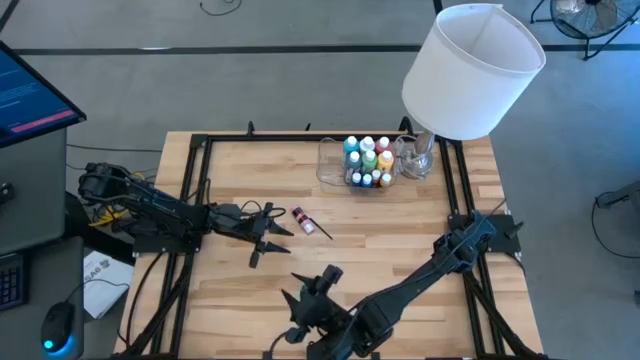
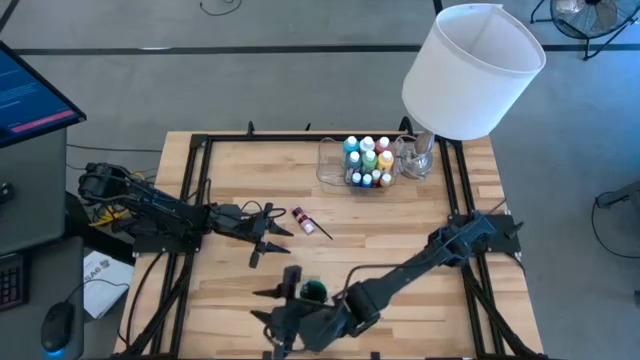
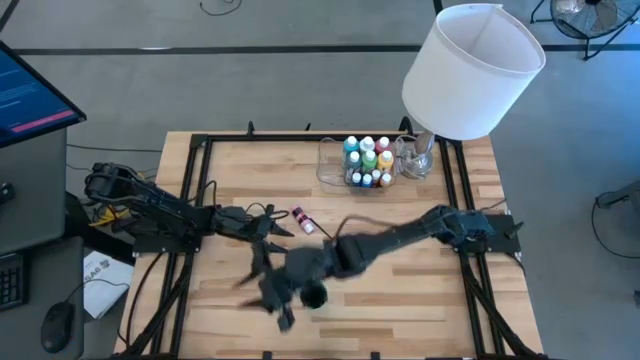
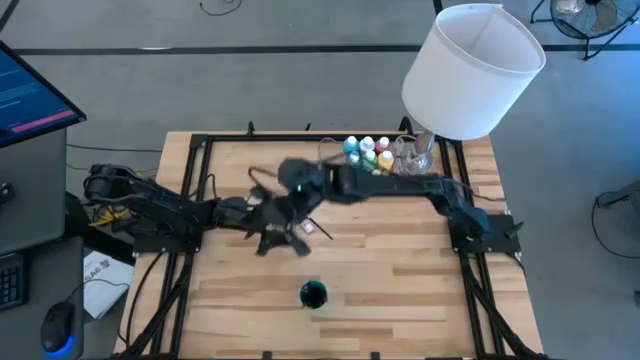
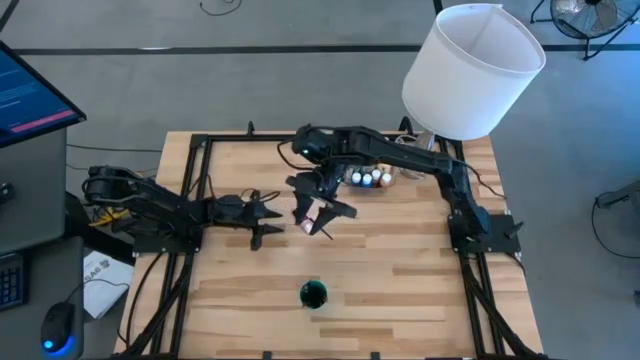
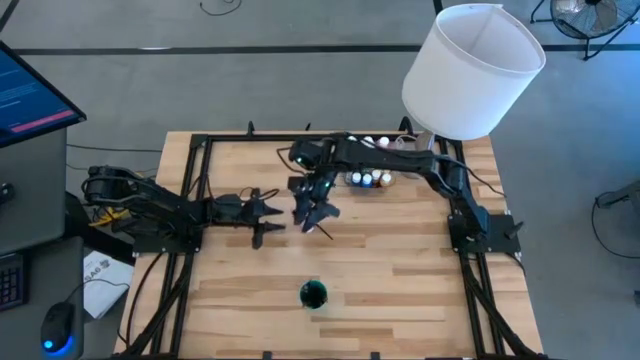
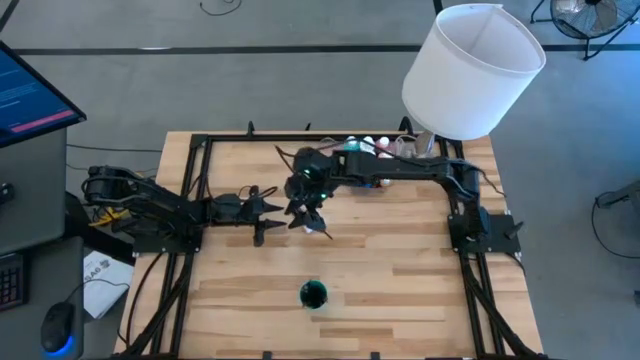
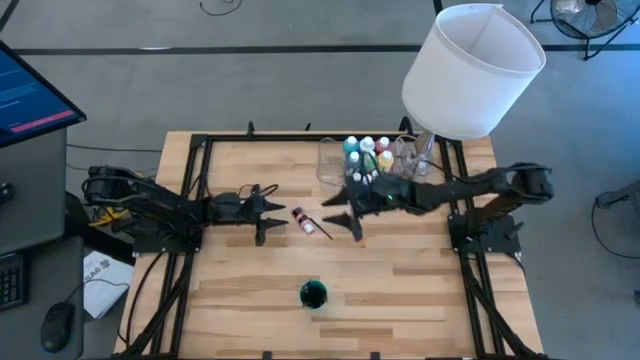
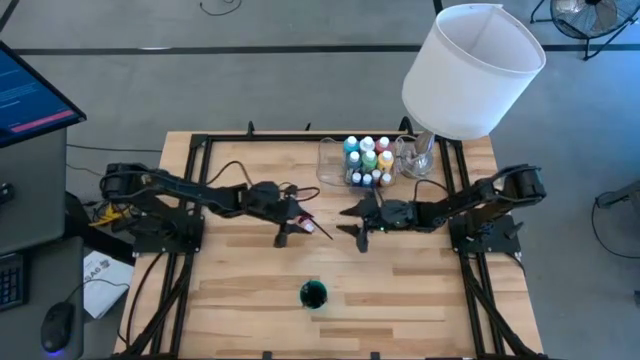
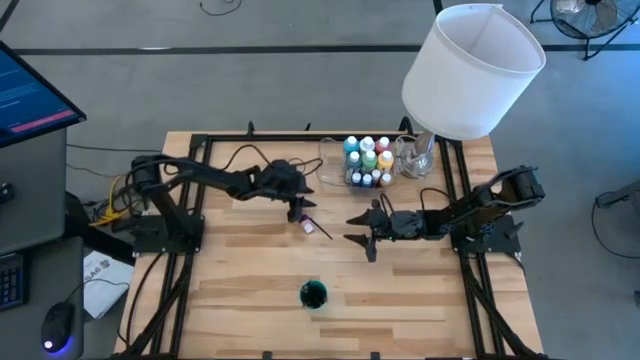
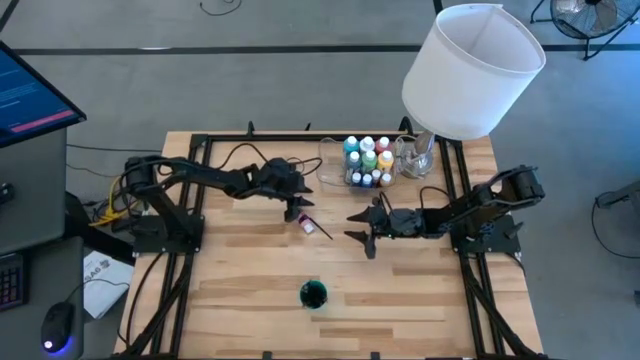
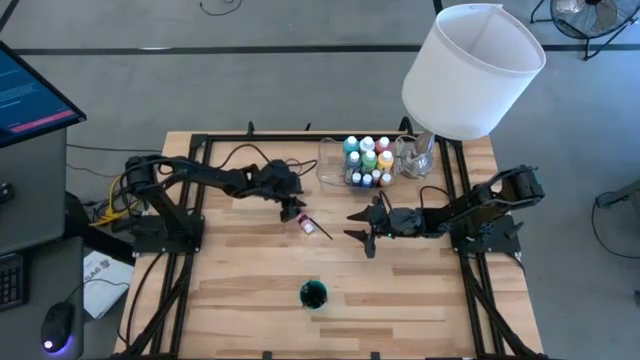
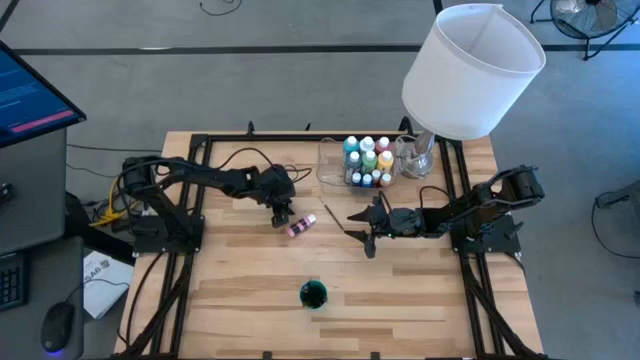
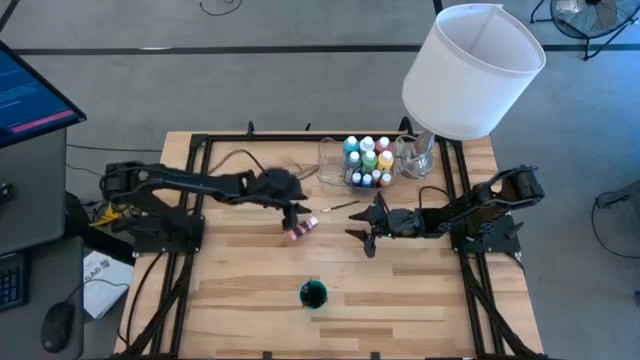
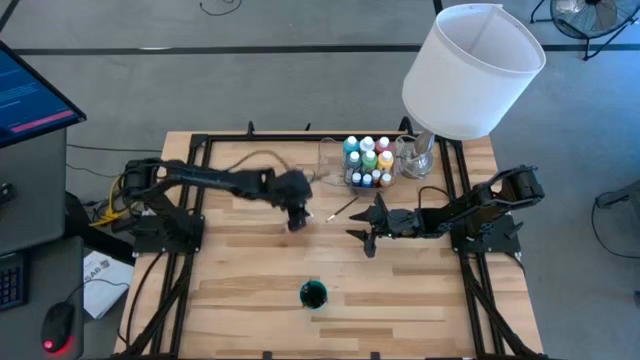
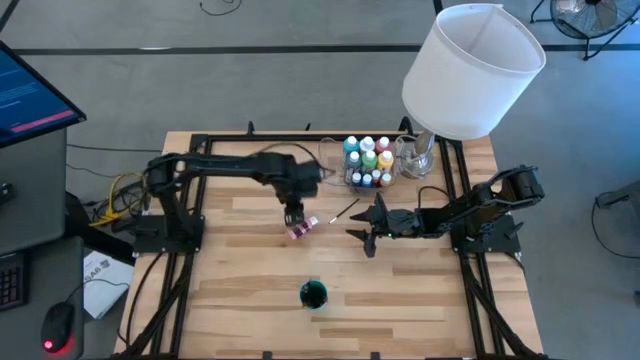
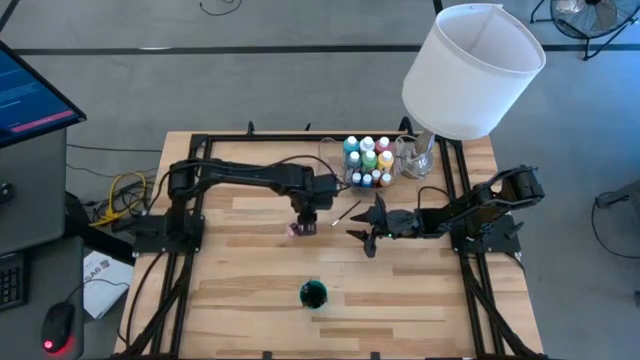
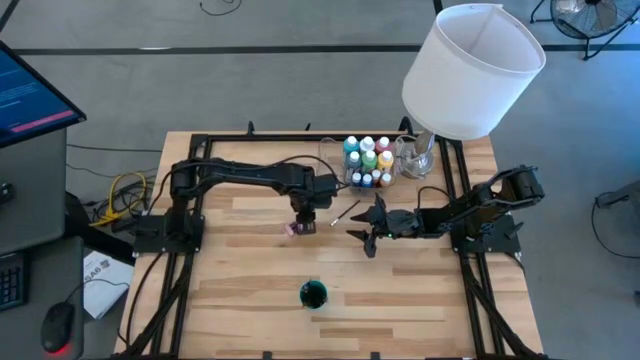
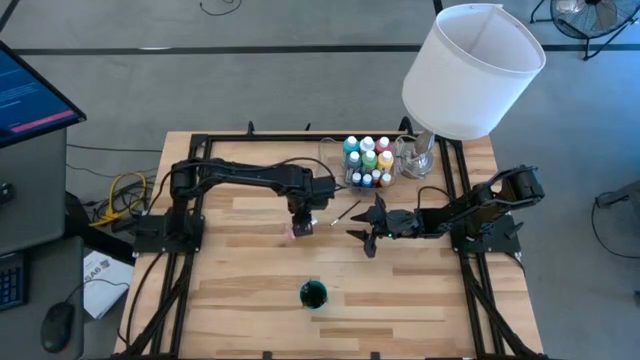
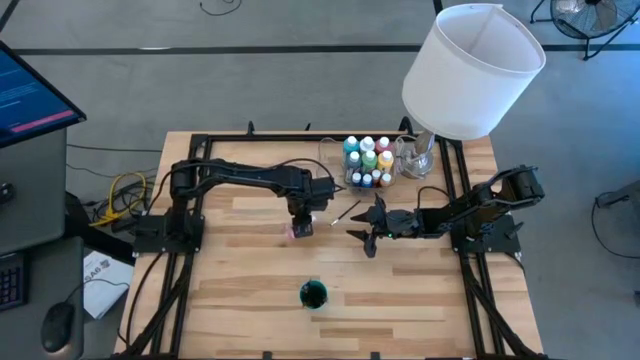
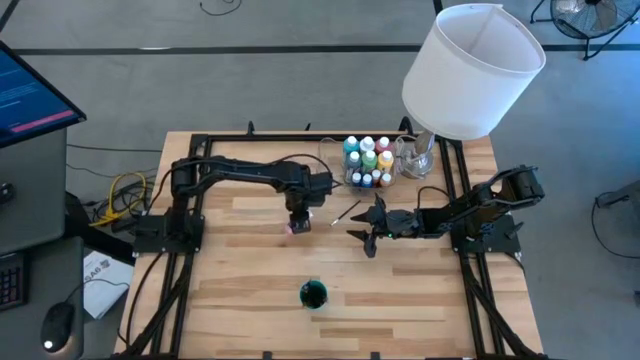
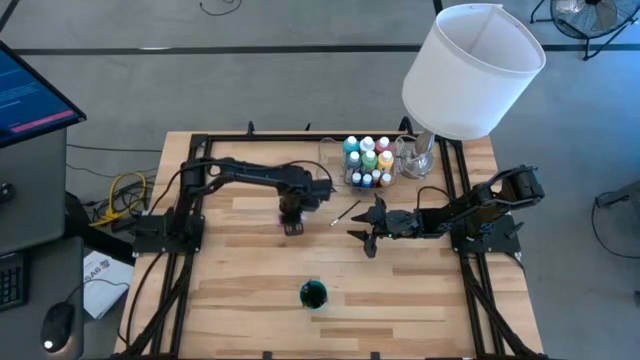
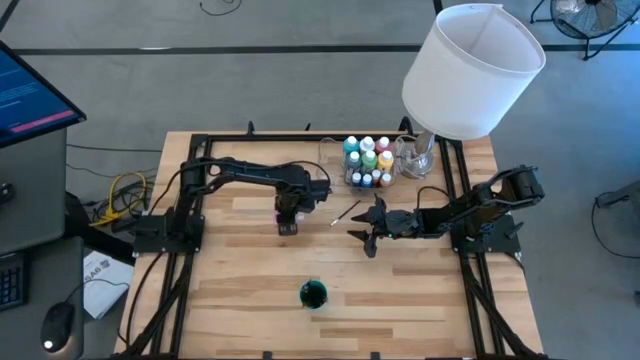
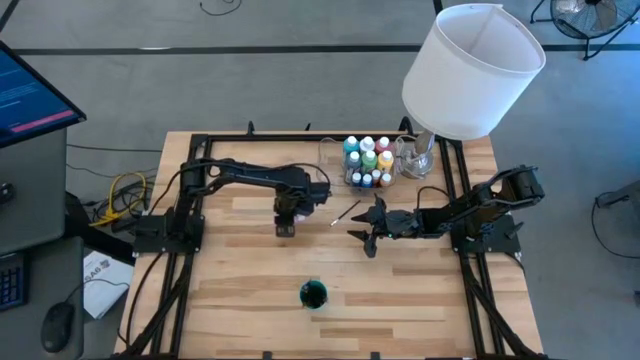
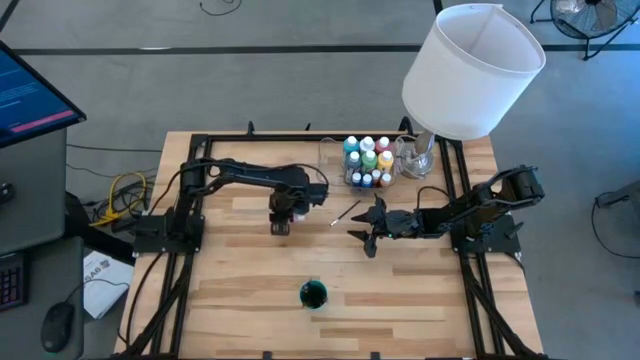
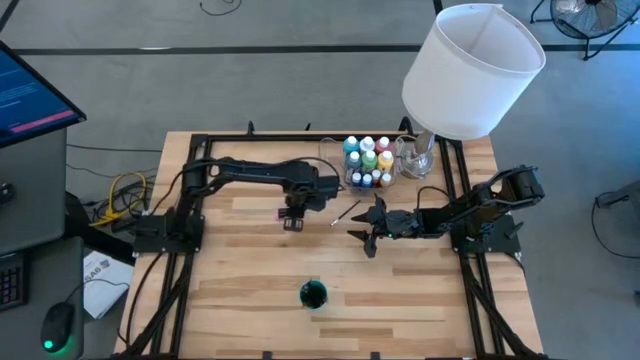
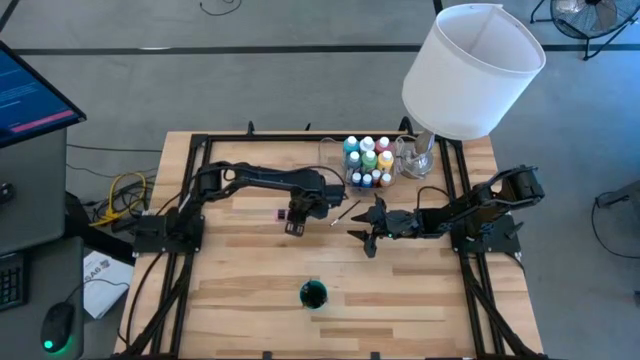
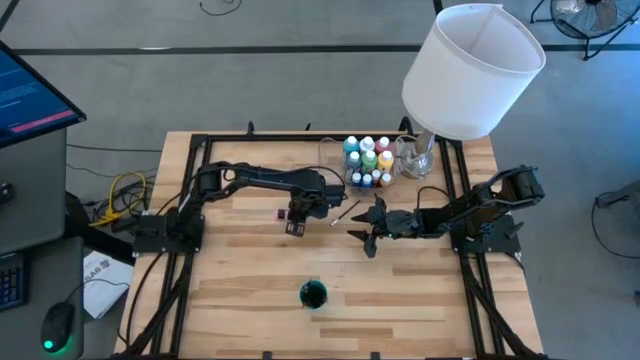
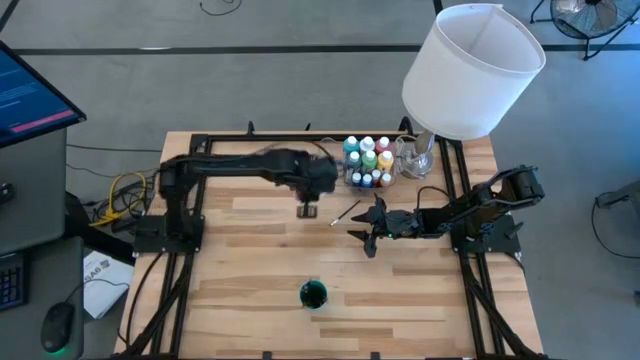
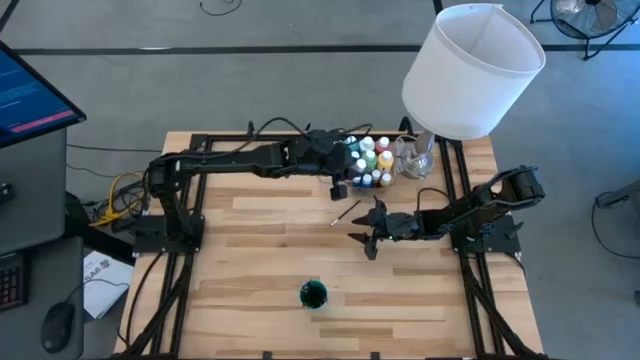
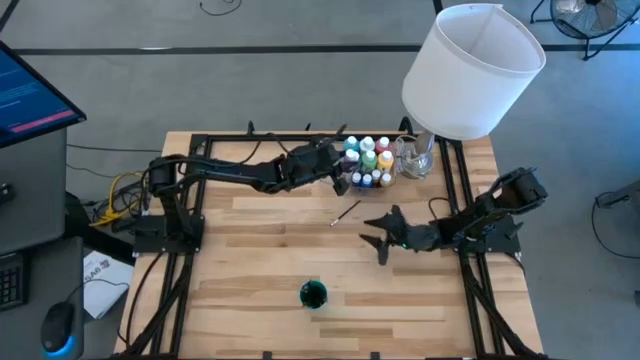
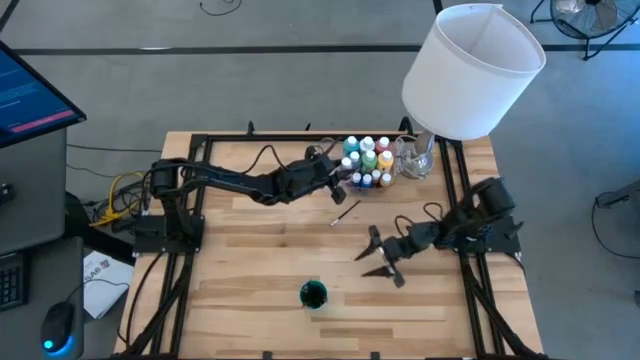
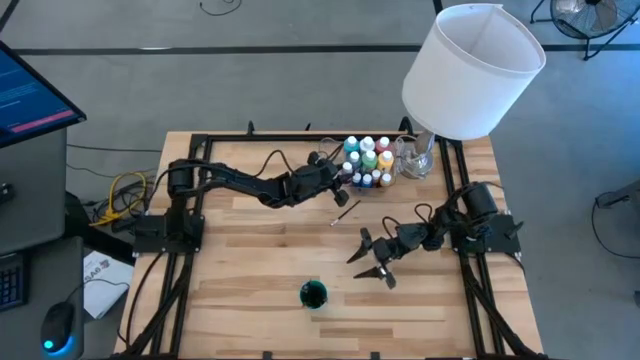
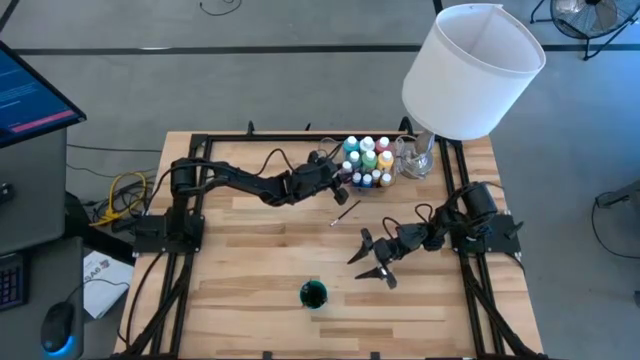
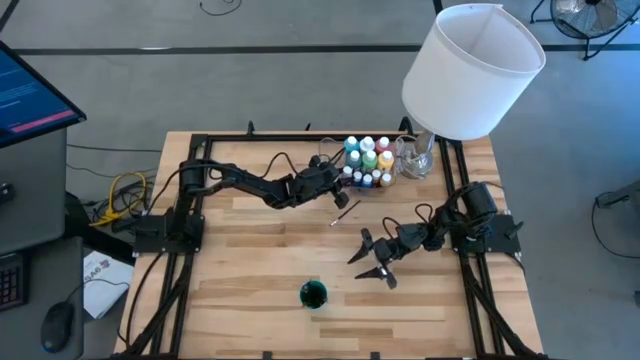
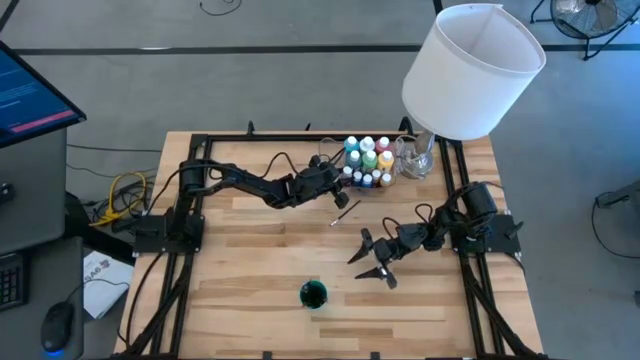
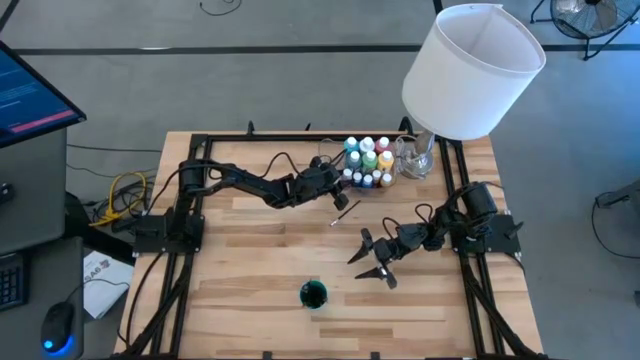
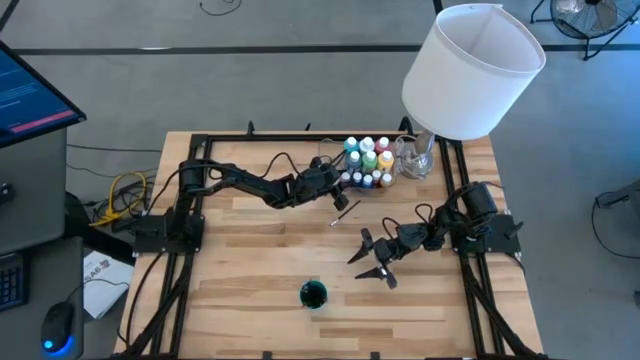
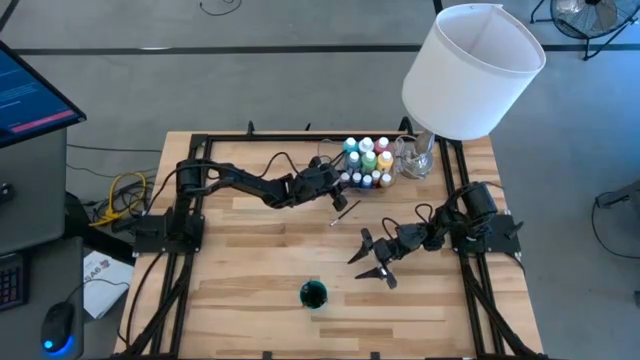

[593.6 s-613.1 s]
Task: Pick & Place Paint Supplies
Put the small pink paint bottle into the transparent bin
